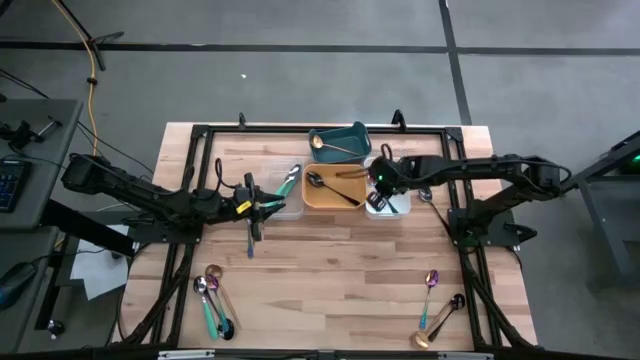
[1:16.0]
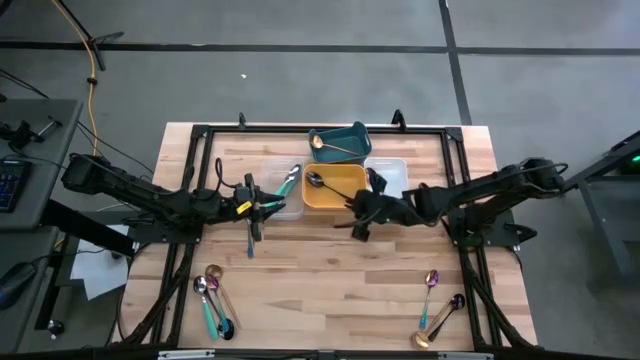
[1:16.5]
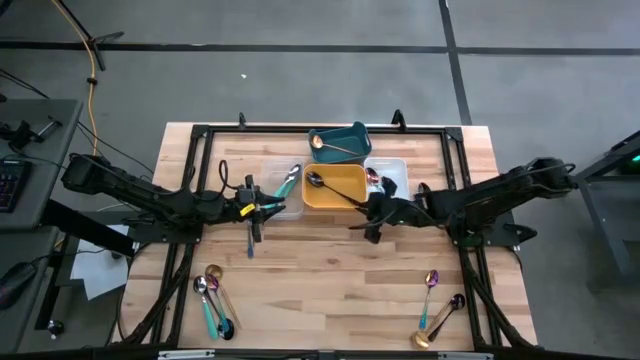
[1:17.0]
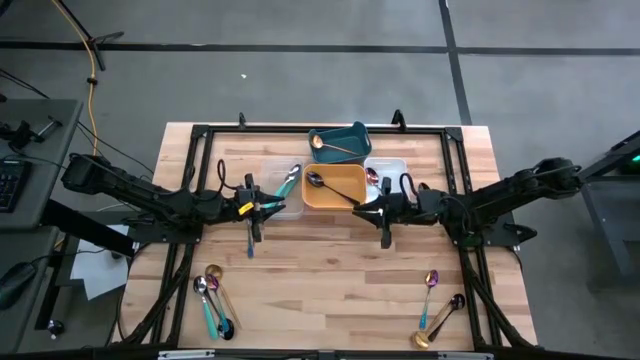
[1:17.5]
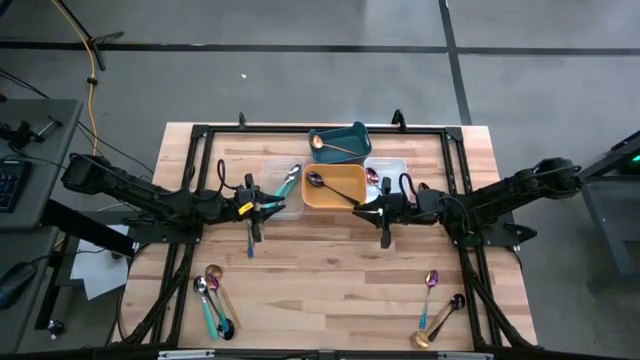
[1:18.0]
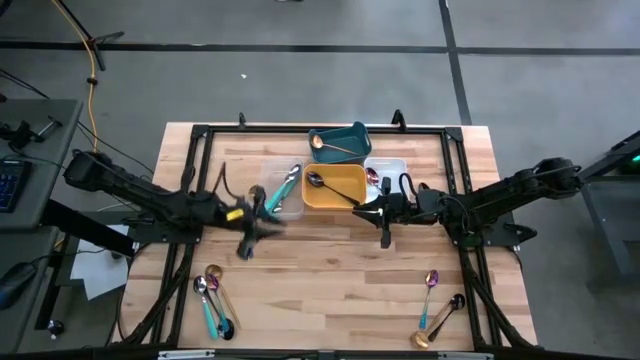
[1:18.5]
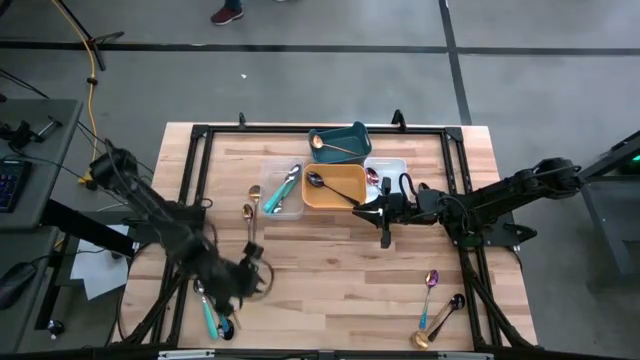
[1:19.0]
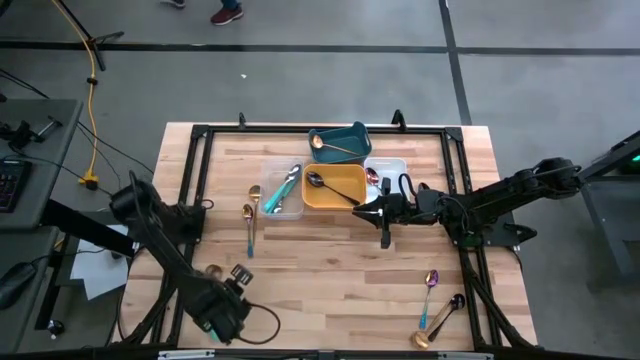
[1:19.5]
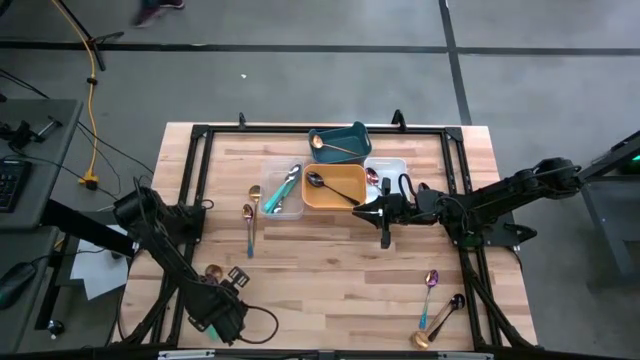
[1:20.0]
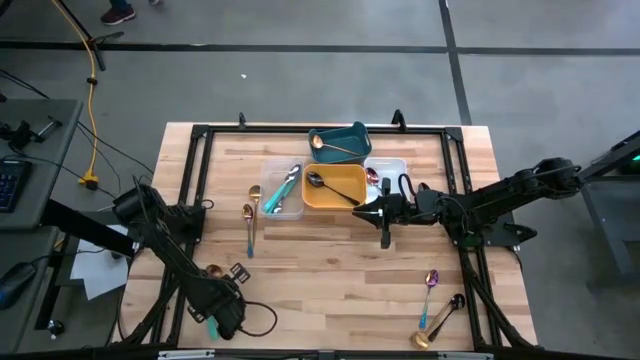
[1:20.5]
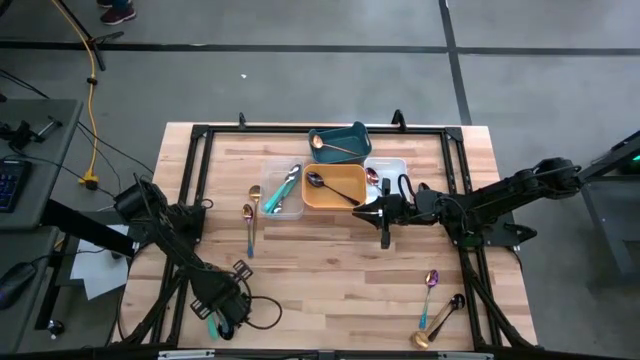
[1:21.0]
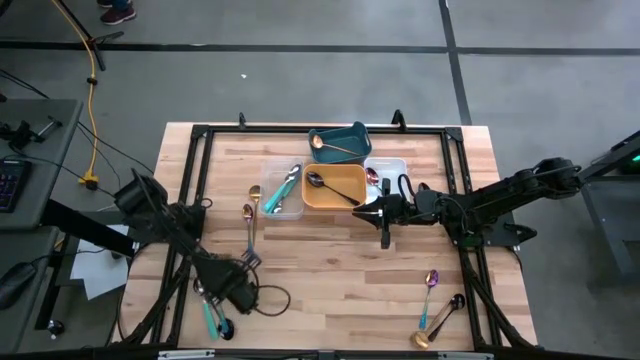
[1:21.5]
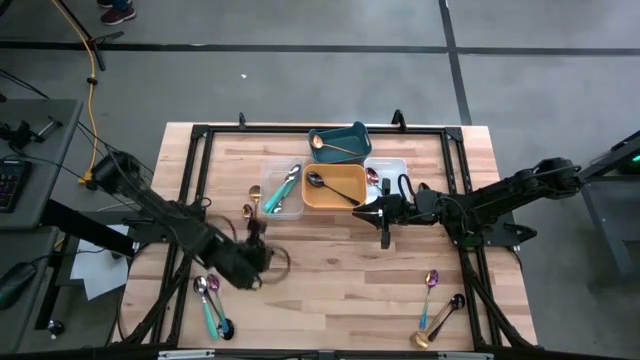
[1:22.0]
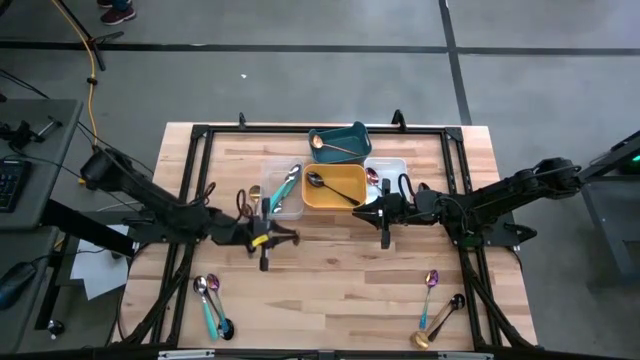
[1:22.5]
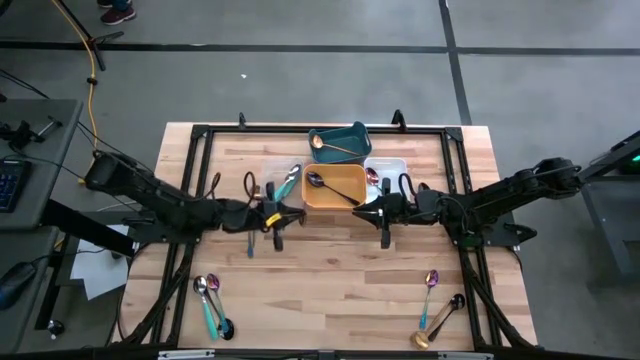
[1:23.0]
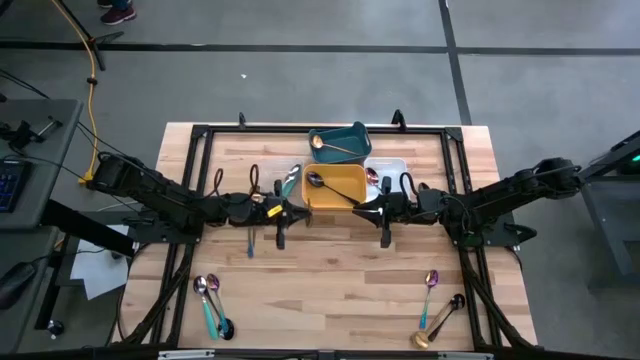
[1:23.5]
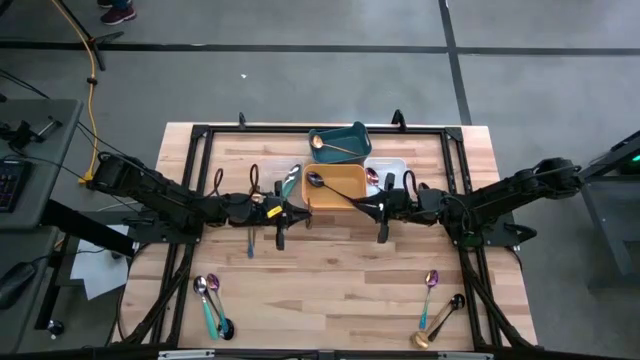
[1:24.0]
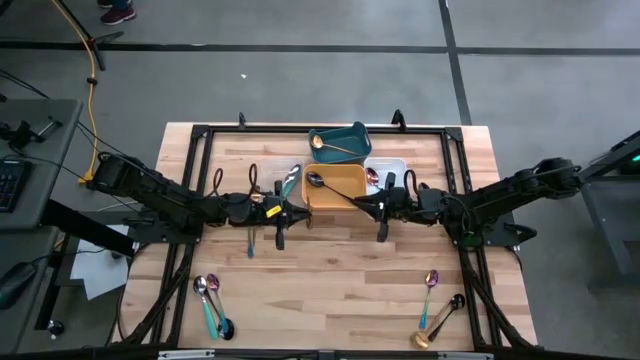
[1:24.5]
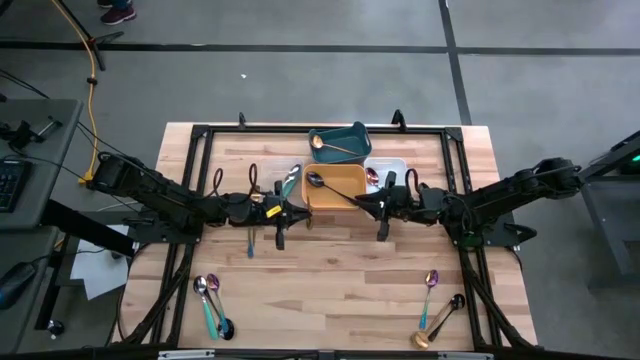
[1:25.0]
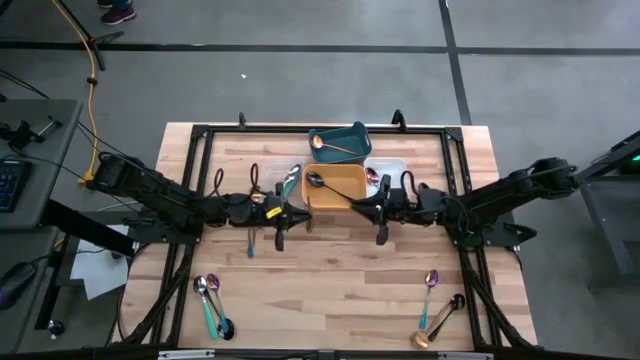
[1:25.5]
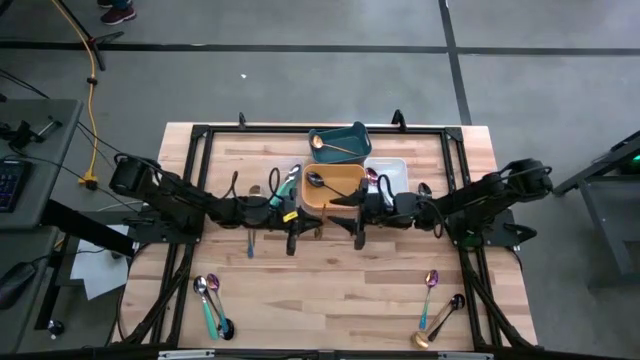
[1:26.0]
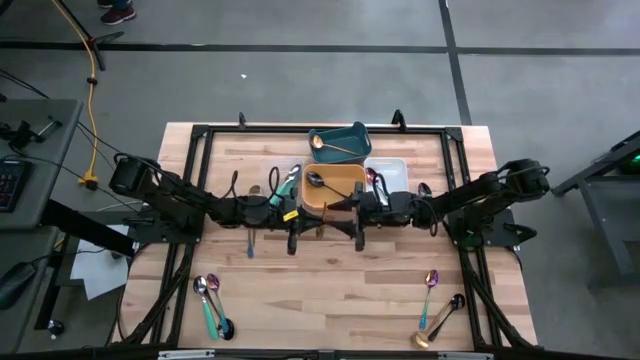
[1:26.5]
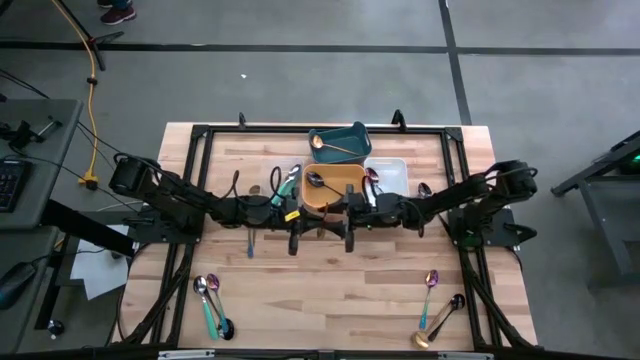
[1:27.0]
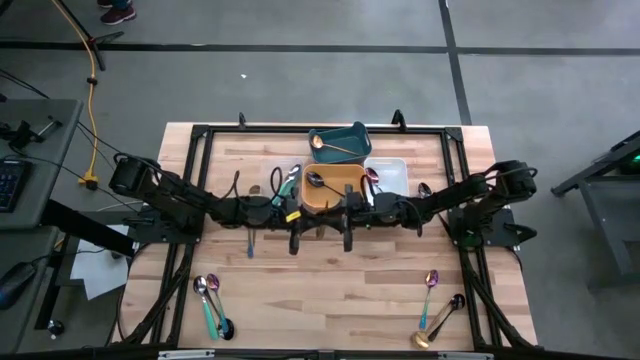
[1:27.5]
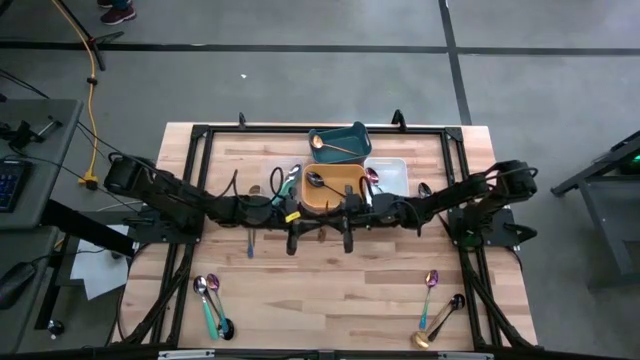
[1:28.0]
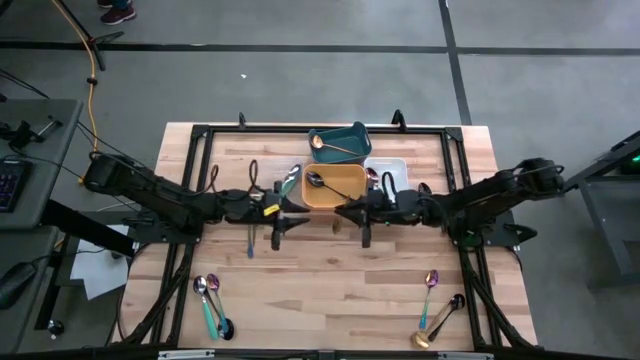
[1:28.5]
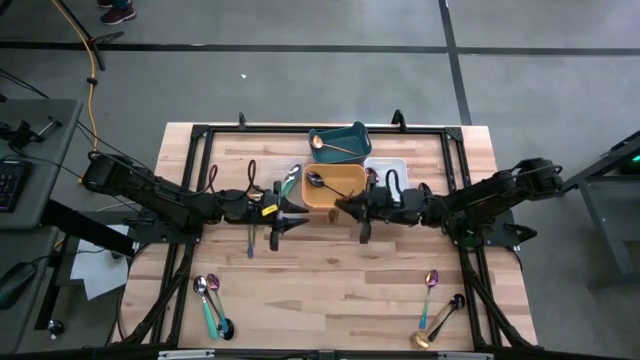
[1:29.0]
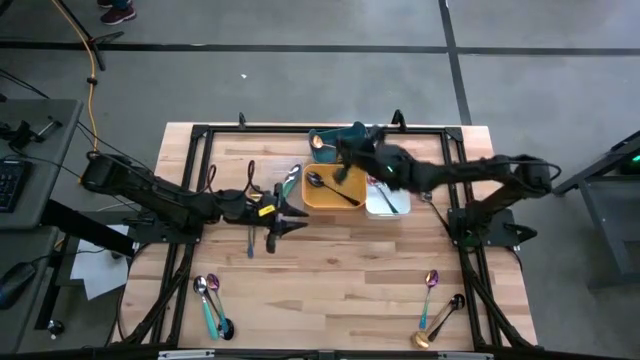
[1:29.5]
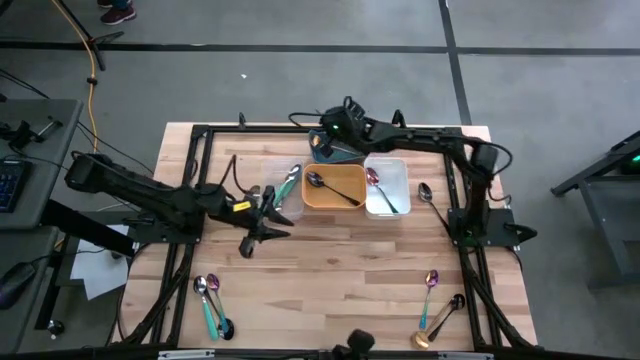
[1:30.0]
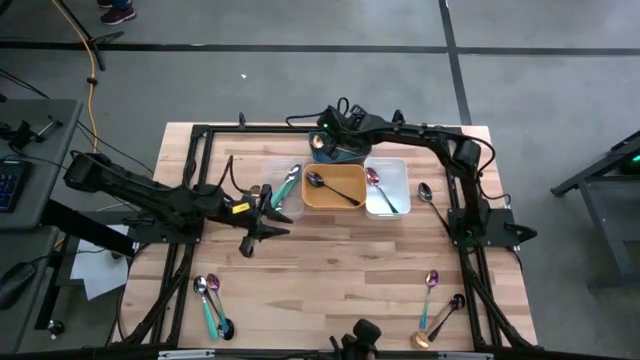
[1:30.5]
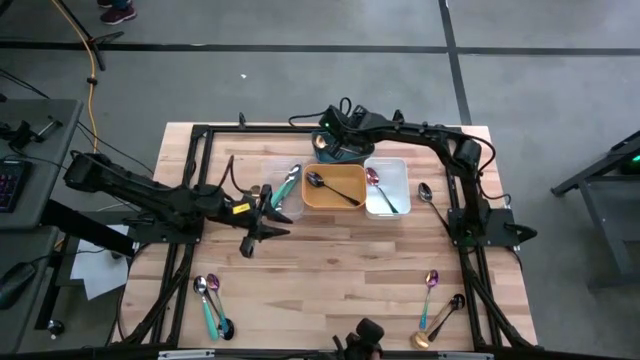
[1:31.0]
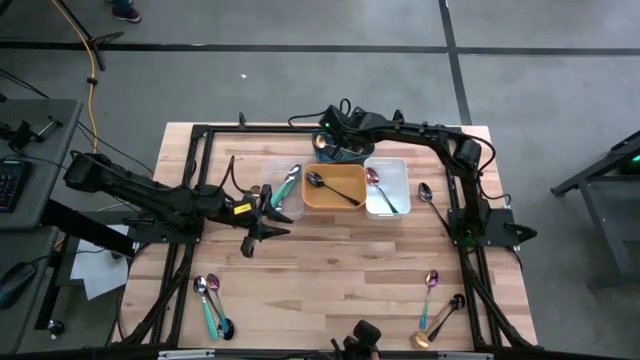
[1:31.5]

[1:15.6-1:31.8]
Task: Sort silverware by color (type)
Put the gold-colored spoon into the green bin

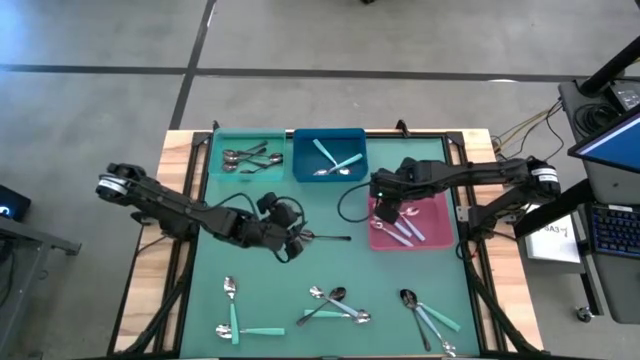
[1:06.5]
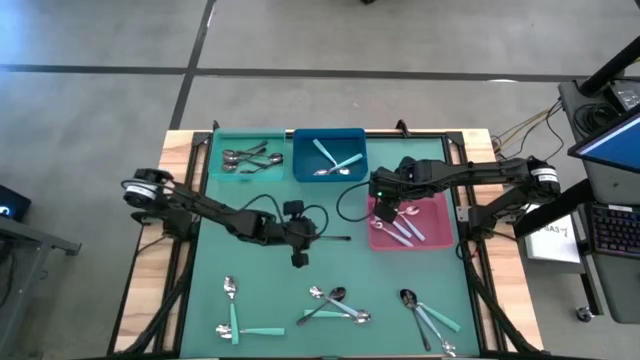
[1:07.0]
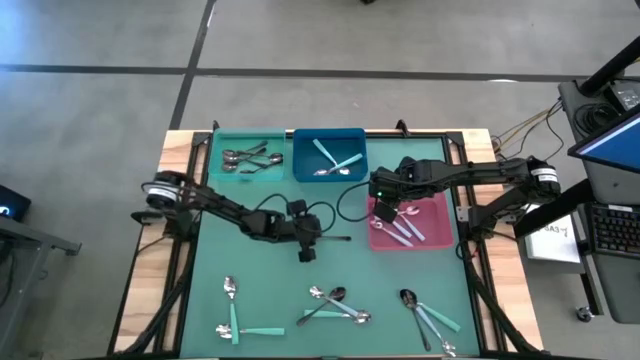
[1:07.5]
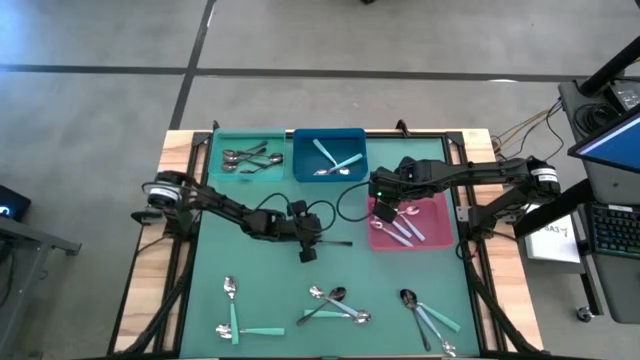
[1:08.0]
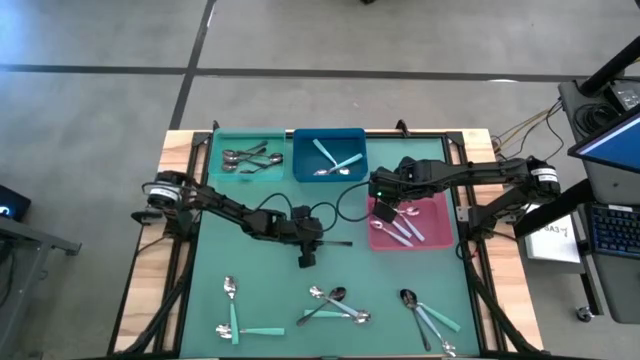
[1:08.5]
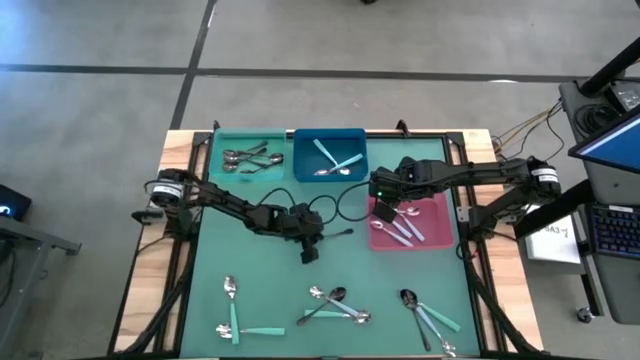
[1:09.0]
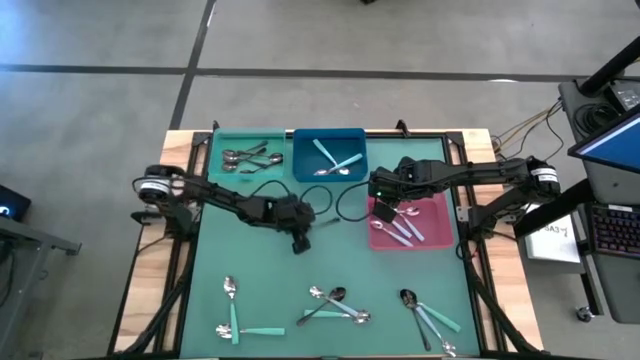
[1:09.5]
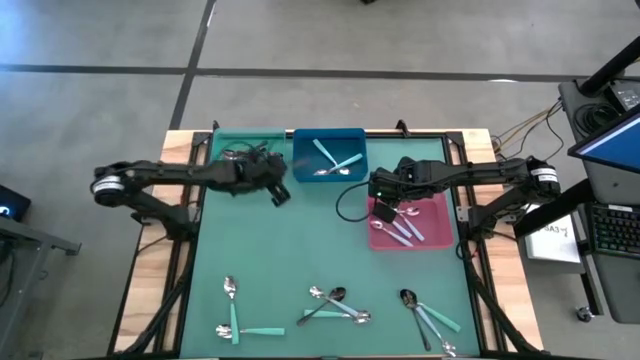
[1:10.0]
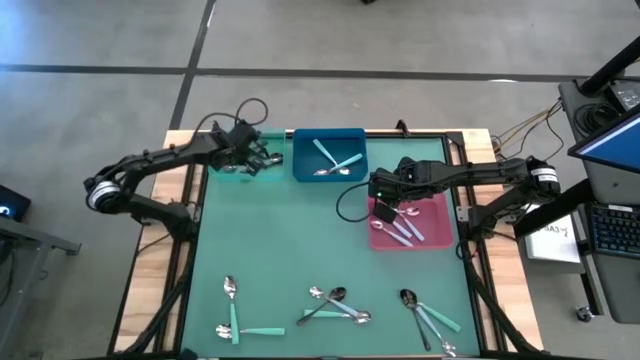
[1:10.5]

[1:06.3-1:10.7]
Task: Sort silverware by color (type)
Put the black spoon into the green bin
